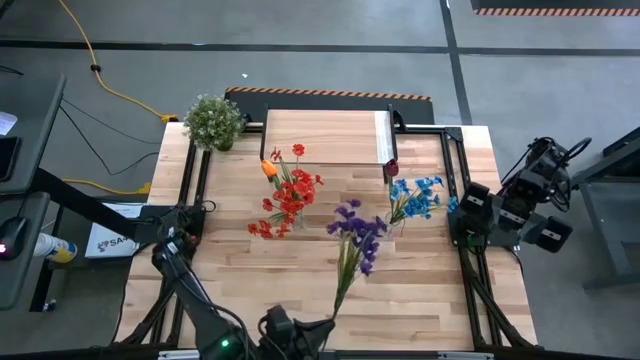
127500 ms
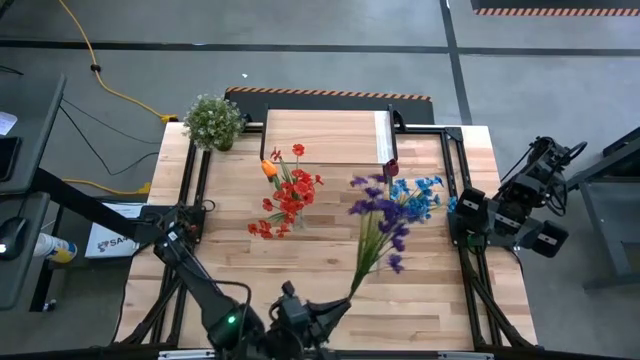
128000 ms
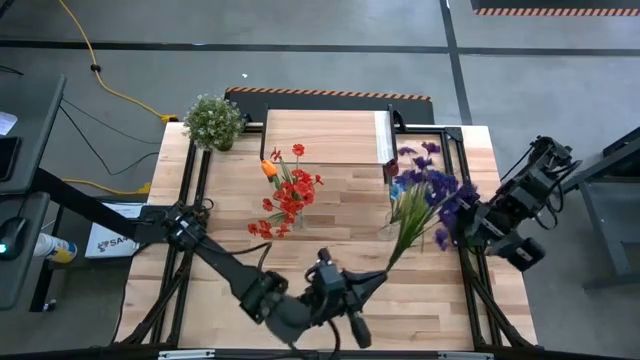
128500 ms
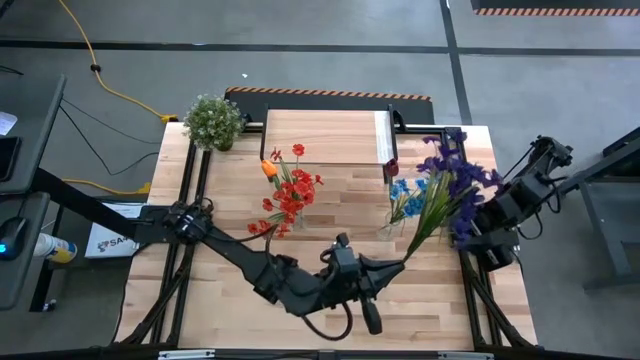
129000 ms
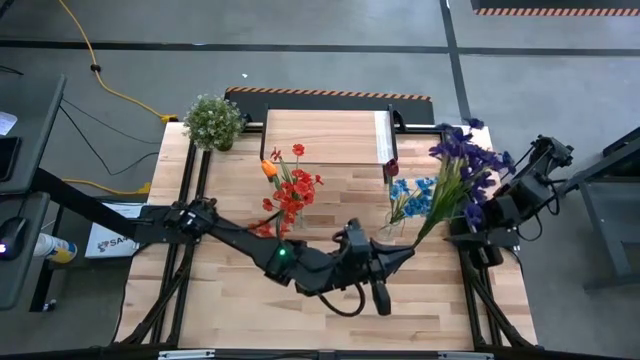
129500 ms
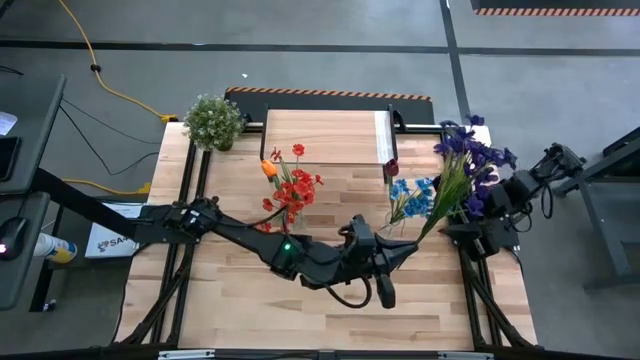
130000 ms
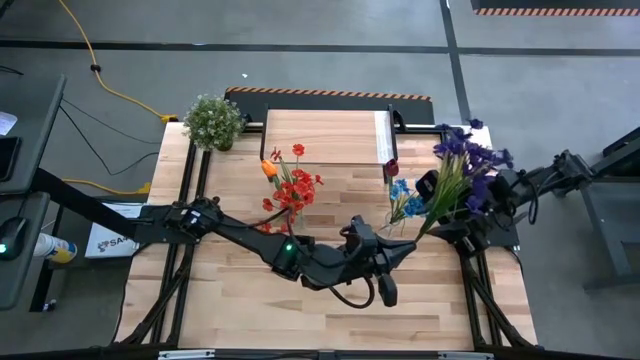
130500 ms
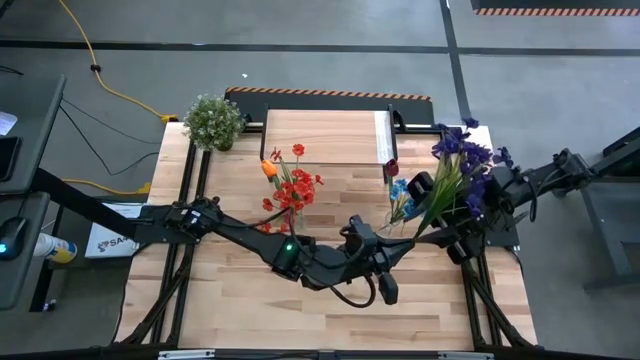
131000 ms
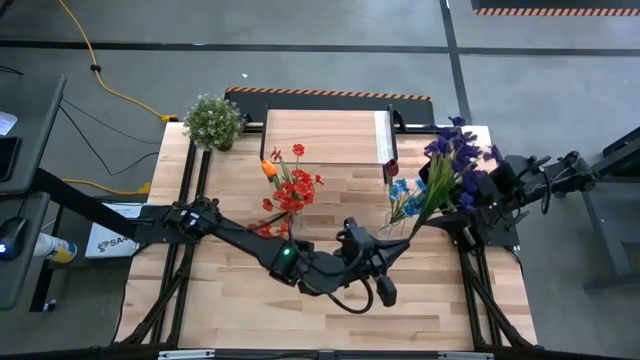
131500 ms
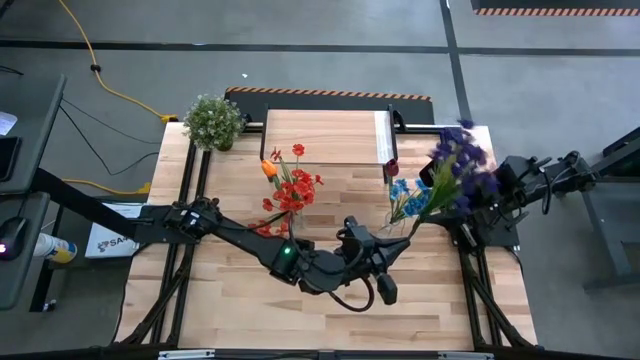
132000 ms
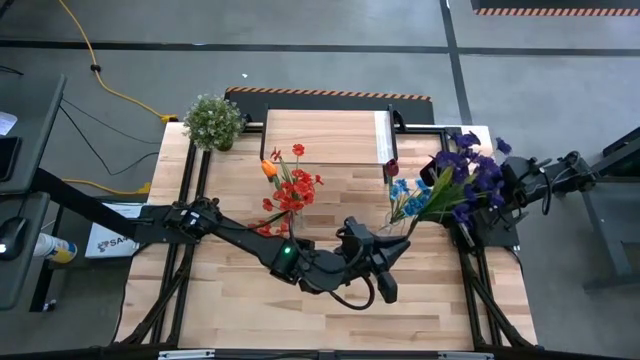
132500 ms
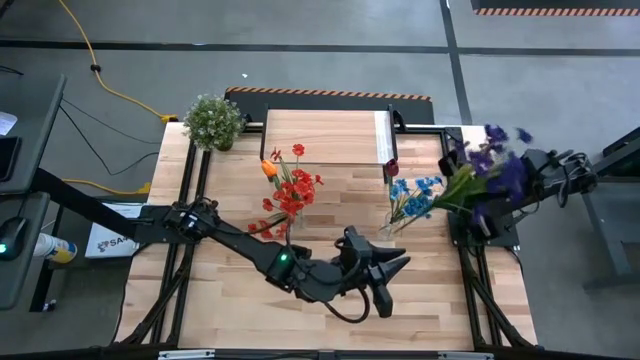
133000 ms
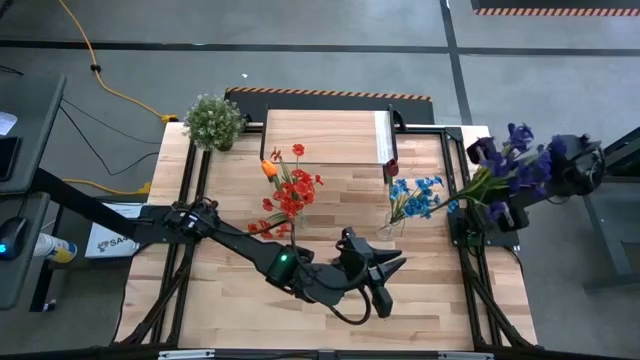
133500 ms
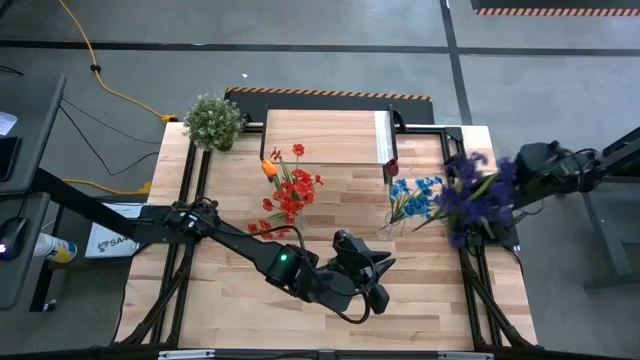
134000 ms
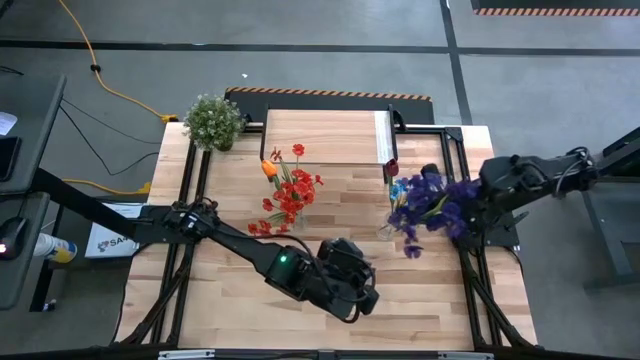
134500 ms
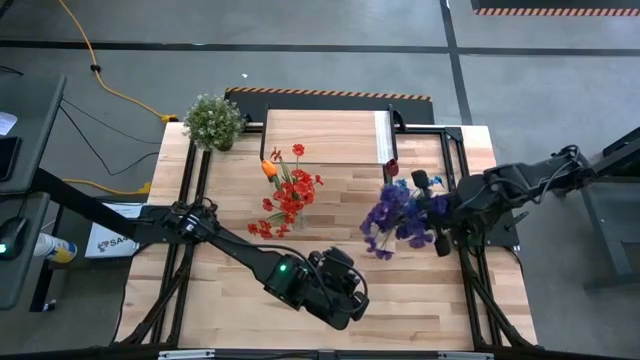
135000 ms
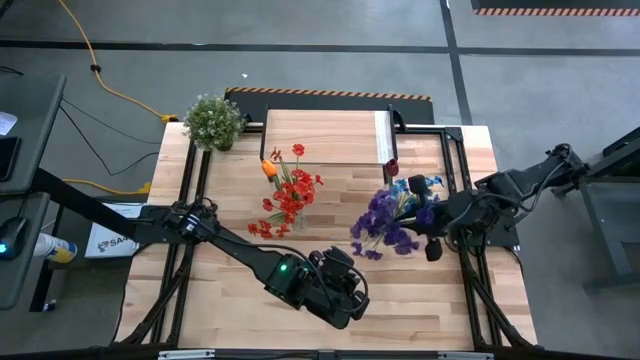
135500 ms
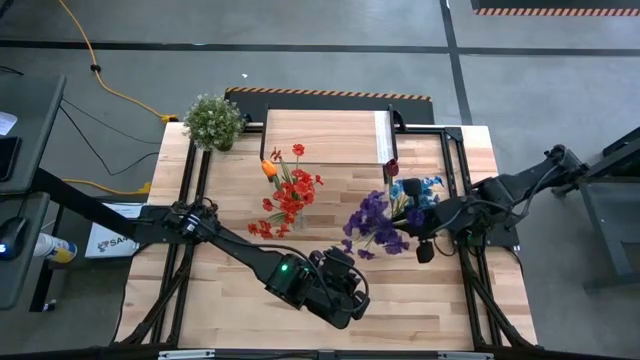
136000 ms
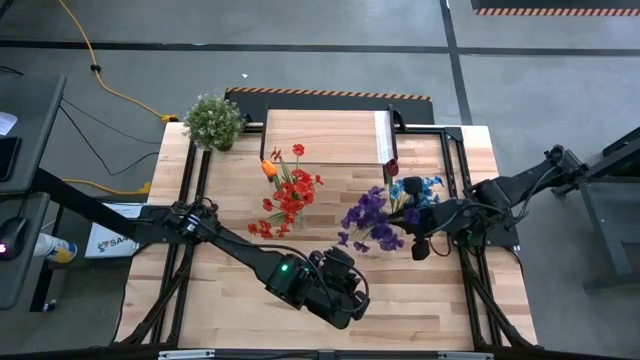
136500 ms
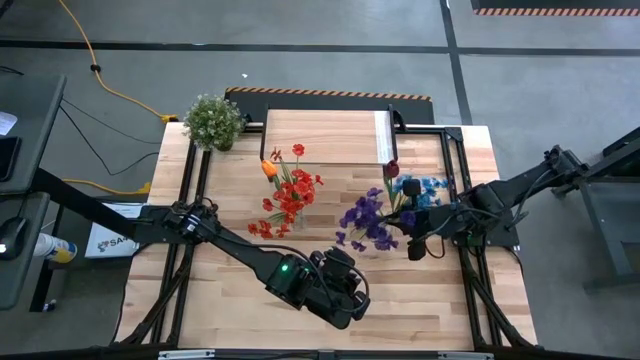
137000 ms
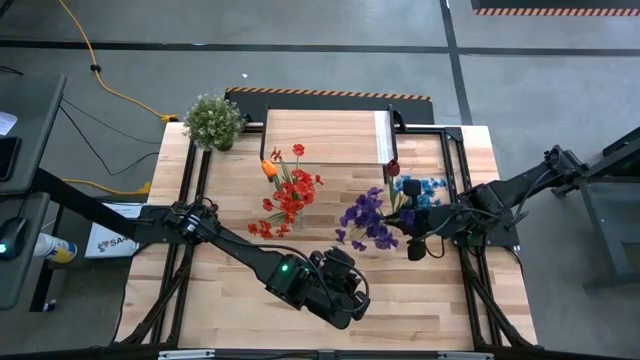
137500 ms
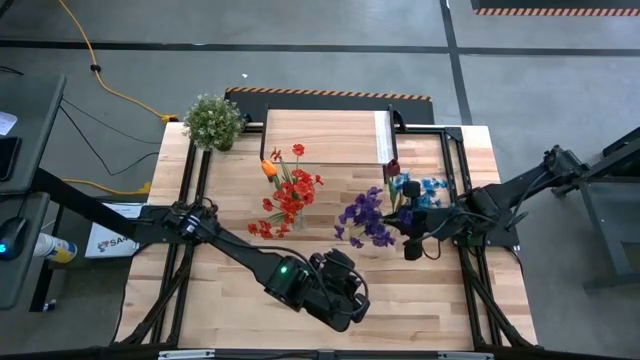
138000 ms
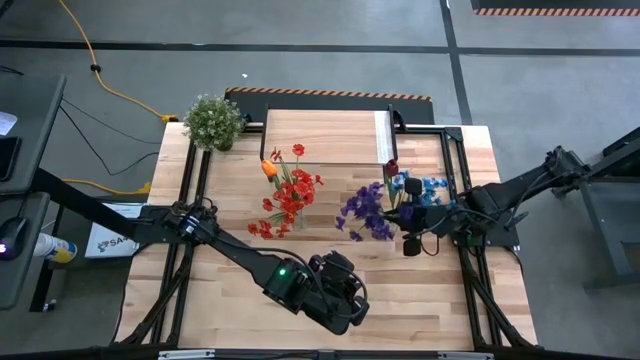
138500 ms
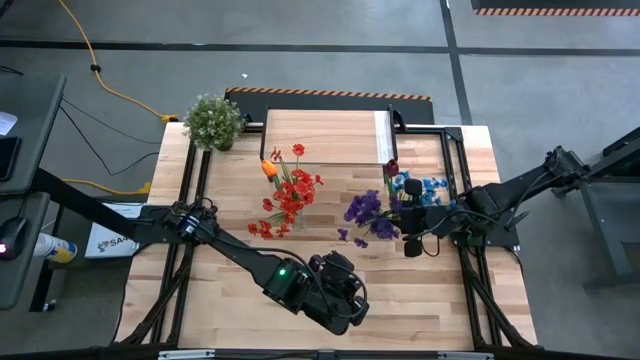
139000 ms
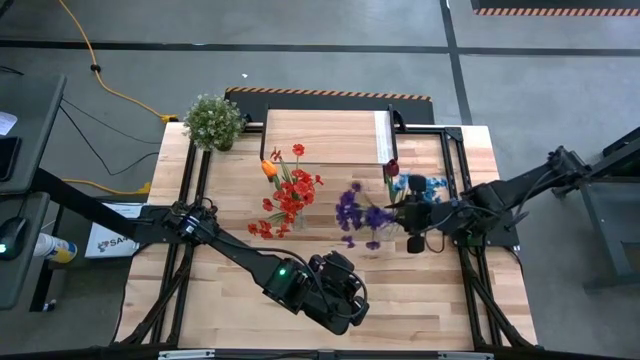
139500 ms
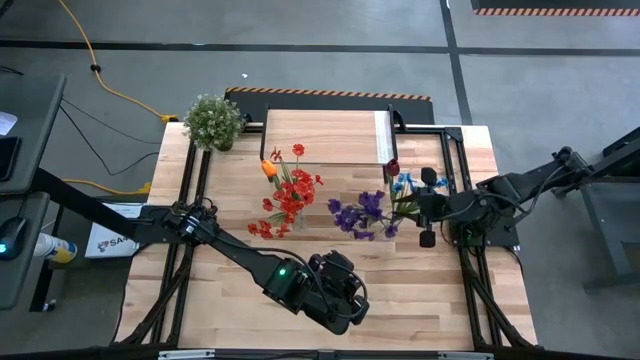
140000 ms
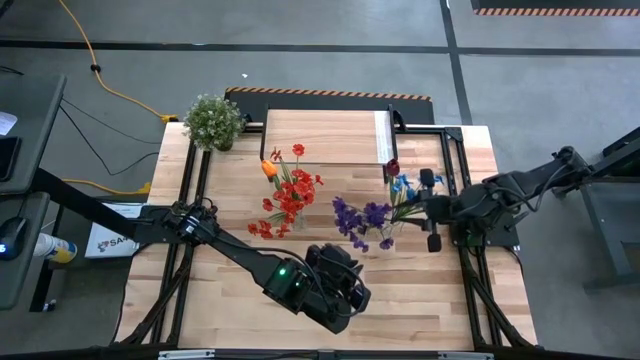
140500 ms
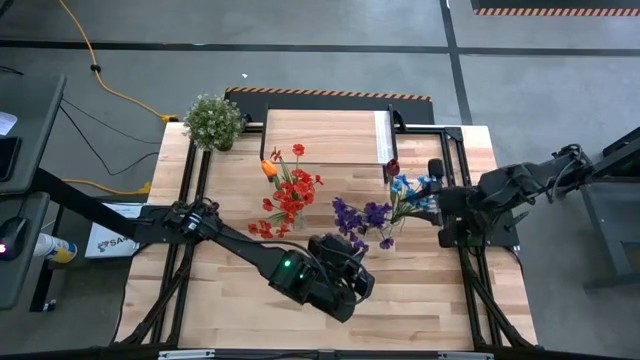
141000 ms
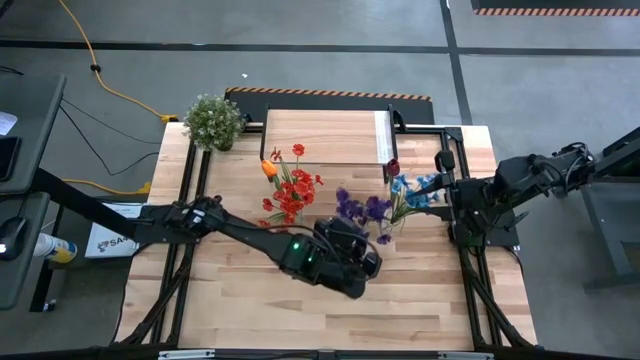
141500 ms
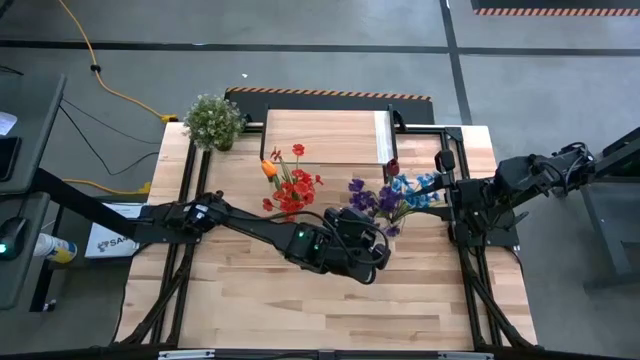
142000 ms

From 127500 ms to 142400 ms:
Task: Pick and place flowers into a vace then onto a shelf
Put the violet flowers into the right transparent vase

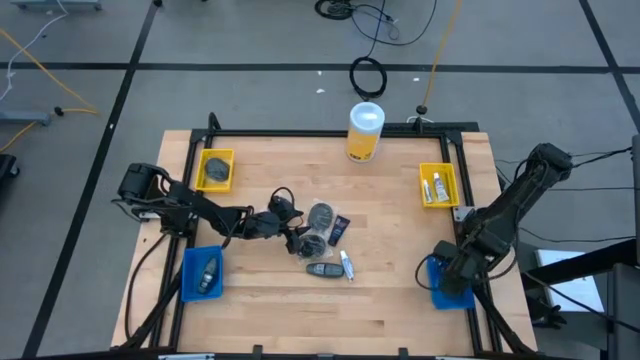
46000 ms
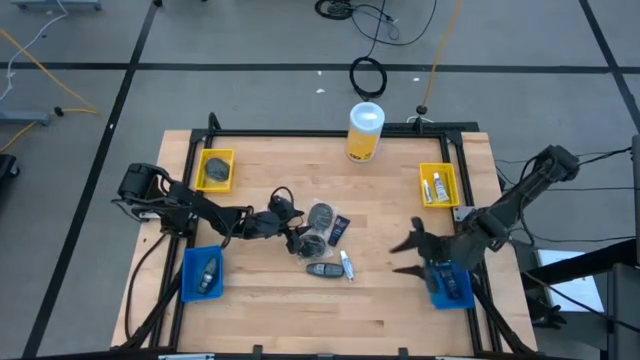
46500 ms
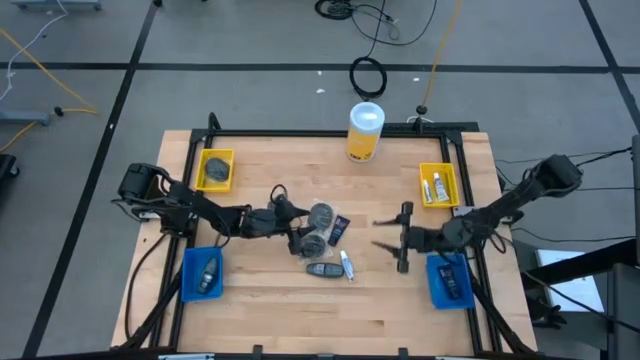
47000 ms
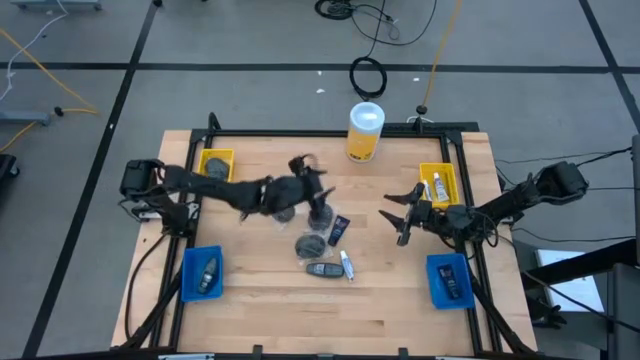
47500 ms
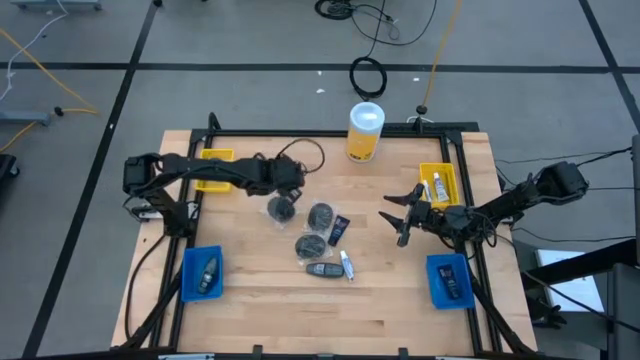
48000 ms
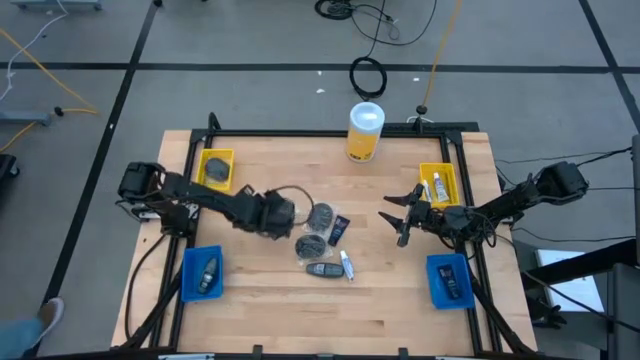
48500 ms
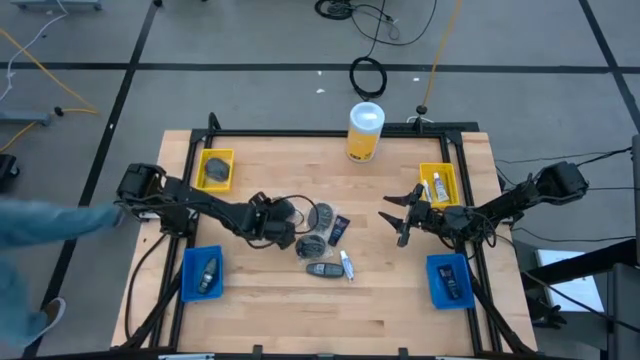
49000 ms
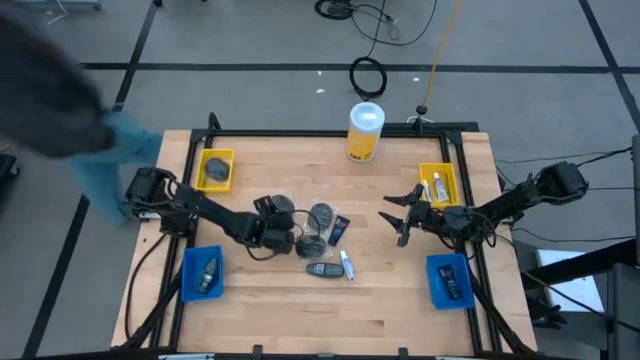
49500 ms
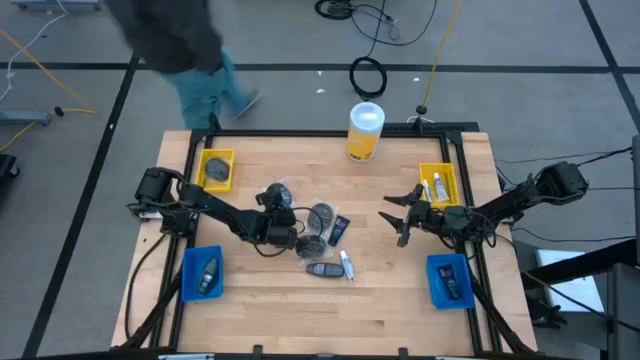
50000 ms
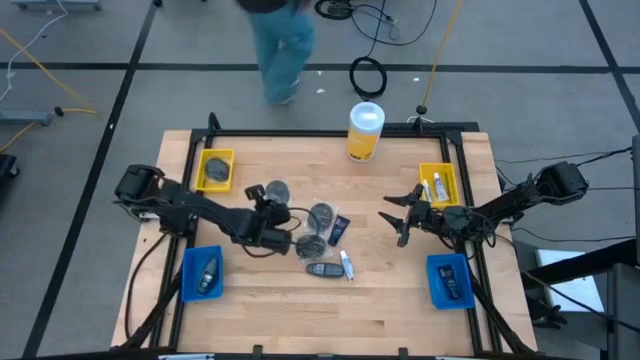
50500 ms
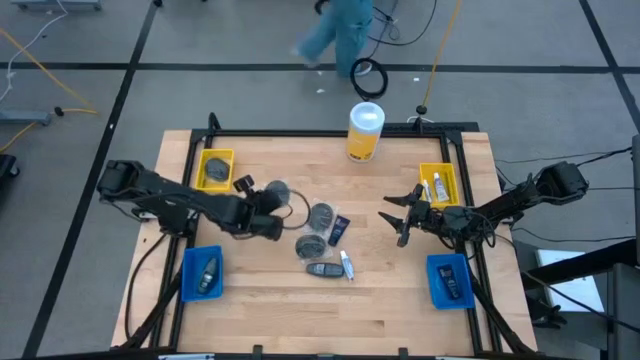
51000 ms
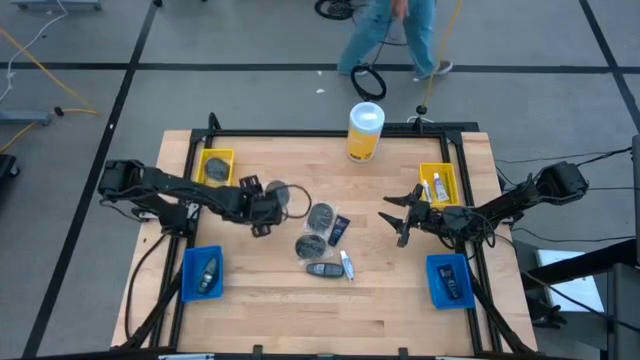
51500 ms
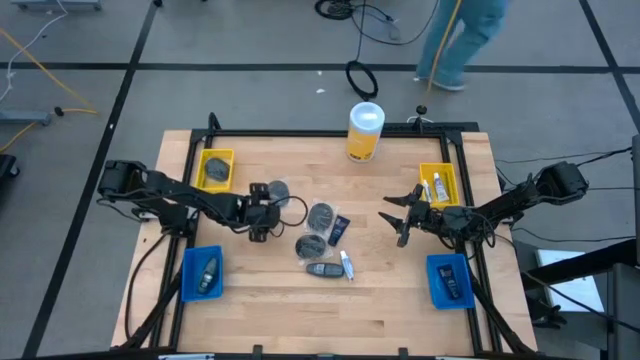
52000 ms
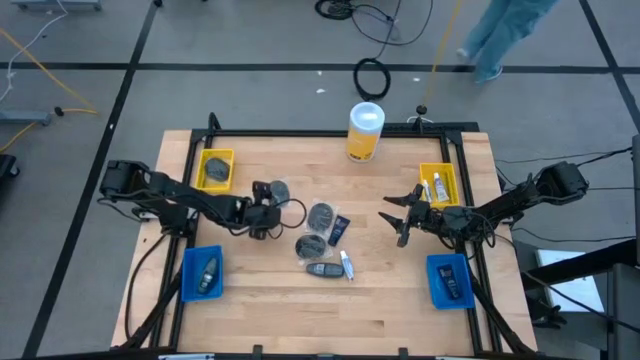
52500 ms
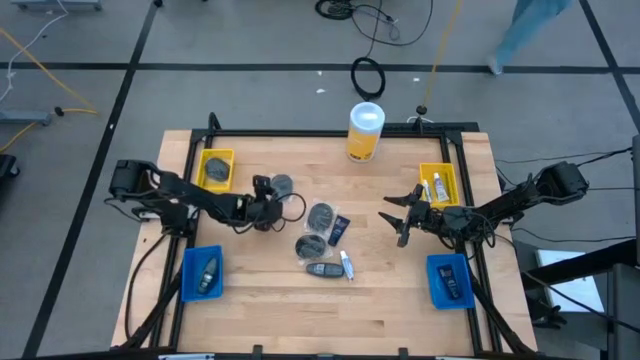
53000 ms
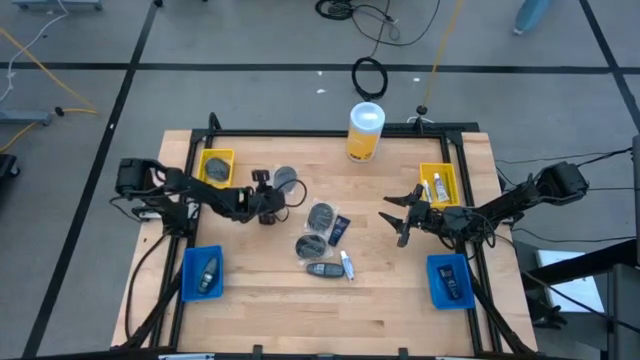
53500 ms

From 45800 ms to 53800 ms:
Task: Pick & Place Travel size toiletries
Put the black hairbrush into the left yellow bin
